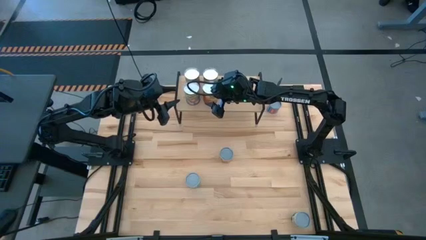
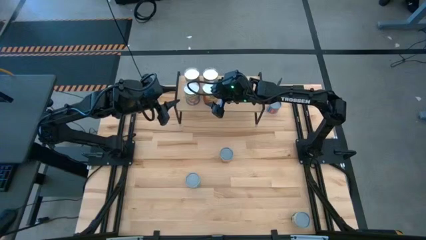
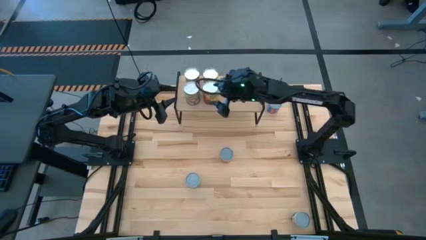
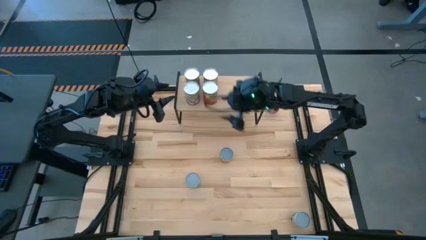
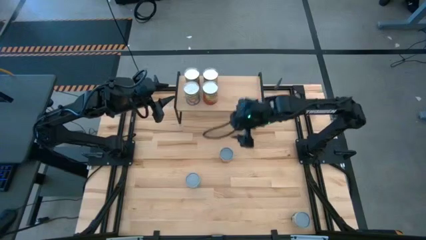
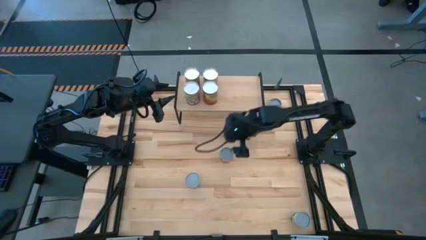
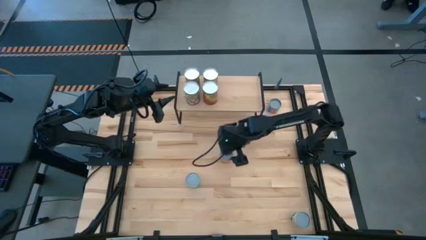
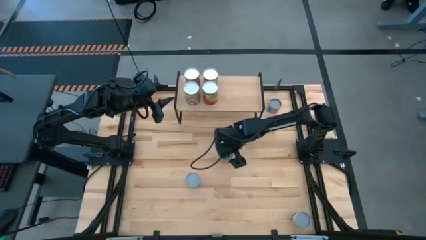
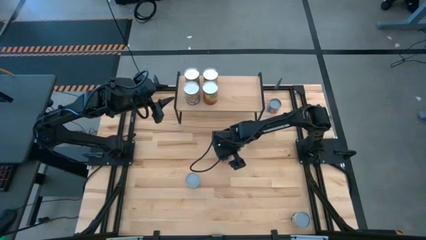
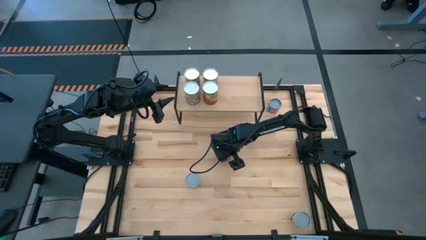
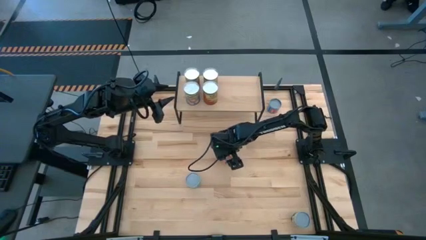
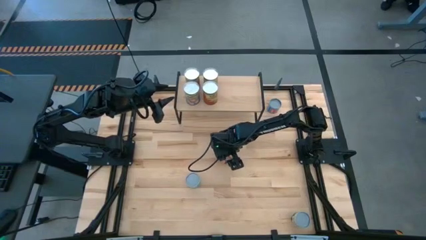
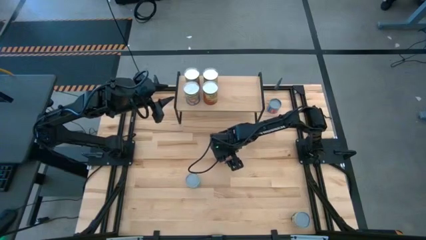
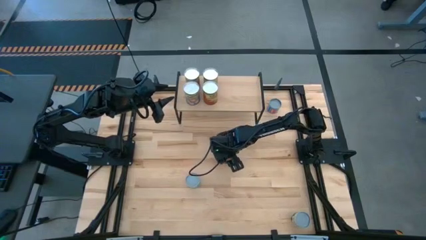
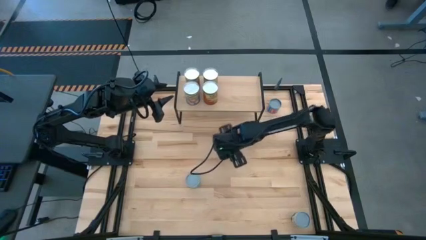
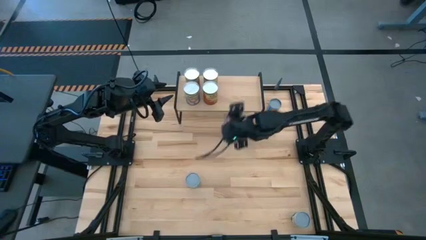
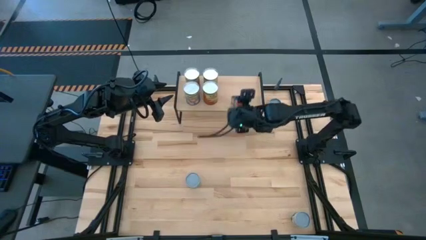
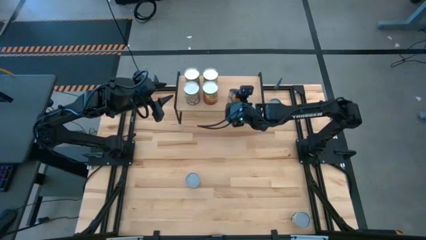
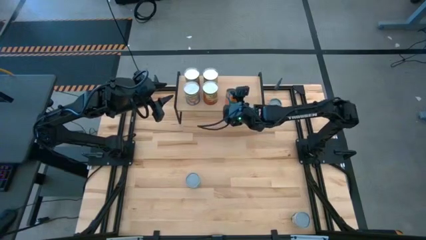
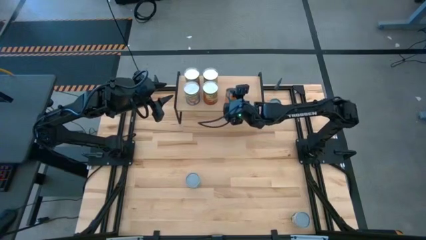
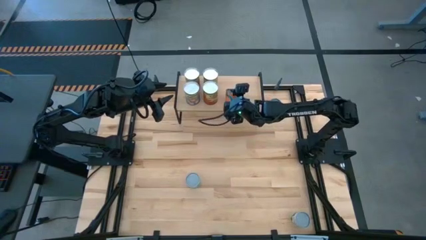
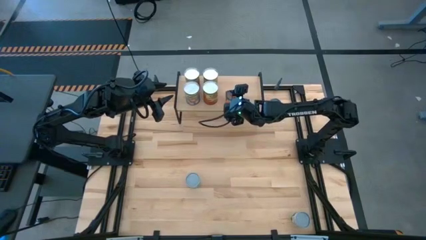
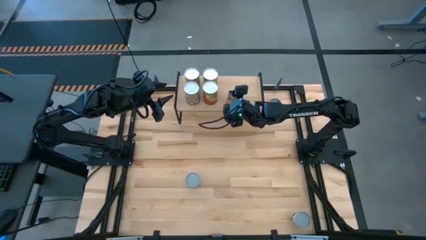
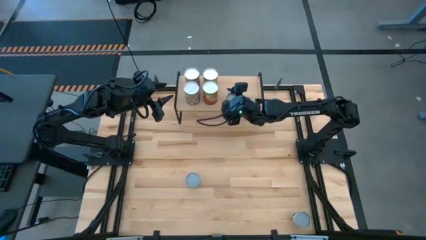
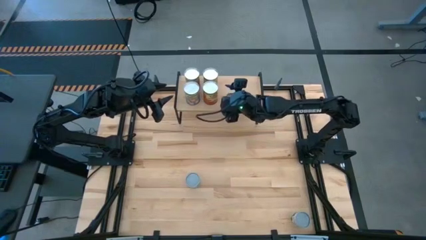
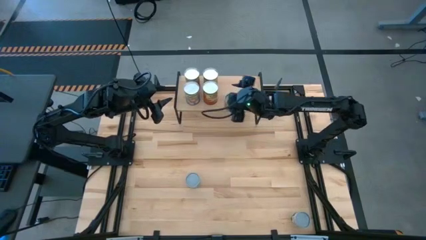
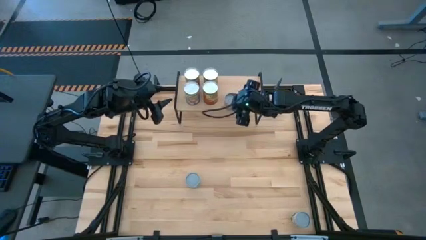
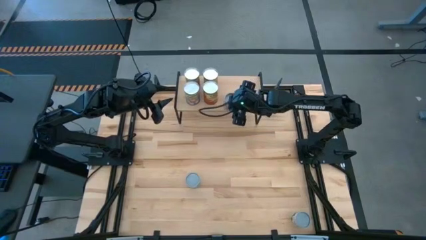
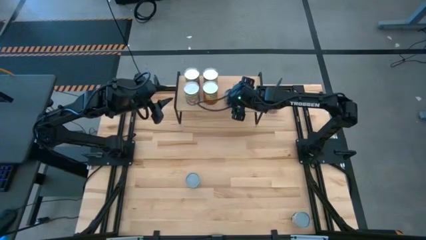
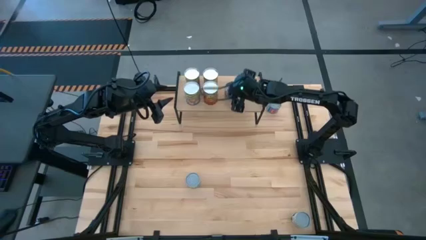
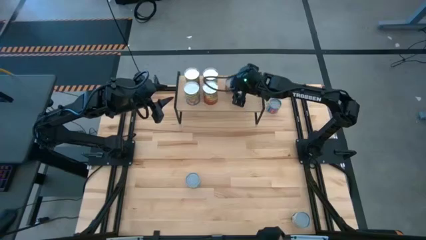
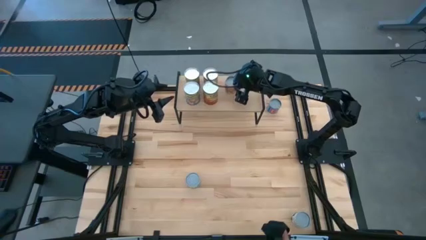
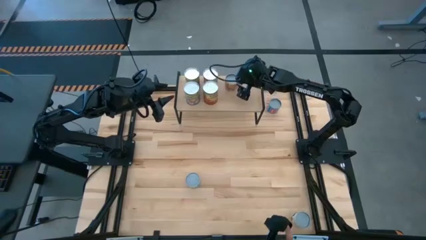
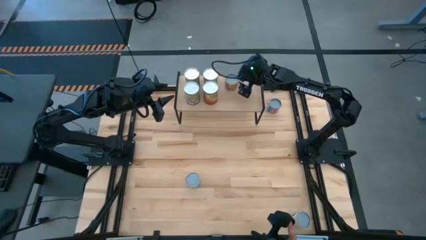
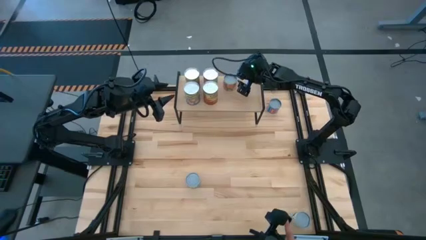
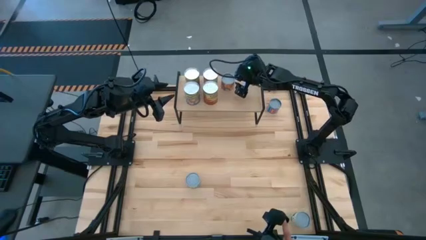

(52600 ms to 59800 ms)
Task: Pick and place cans onto a shelf
Put the canned oranges on the shelf

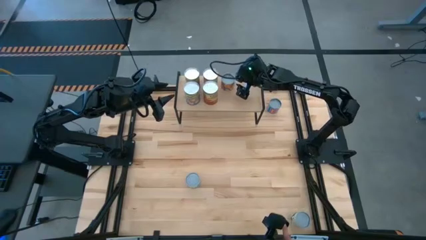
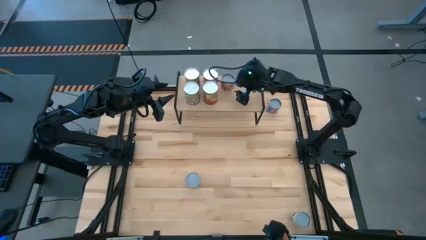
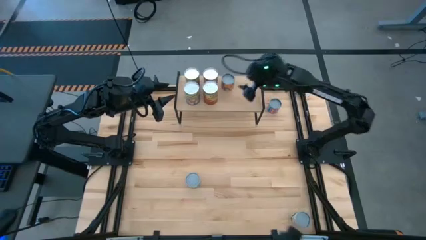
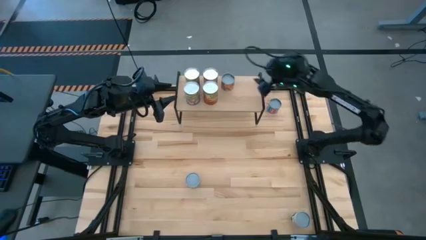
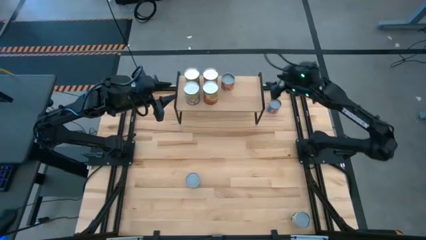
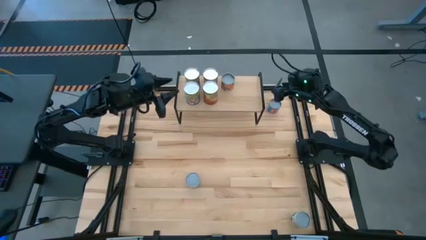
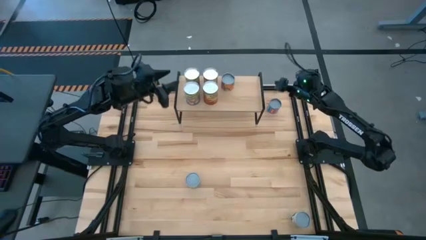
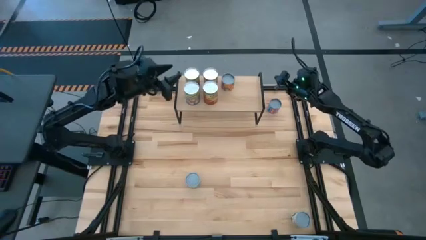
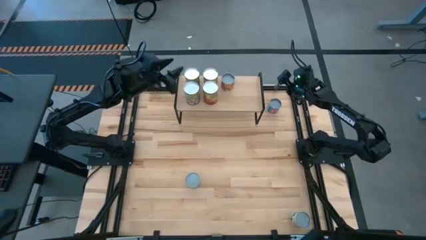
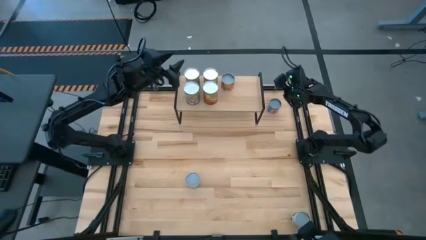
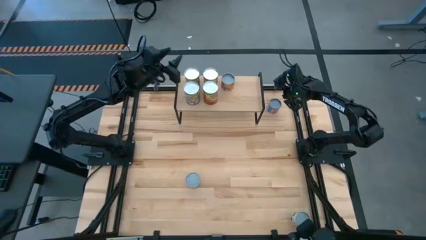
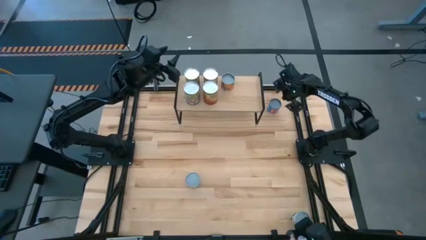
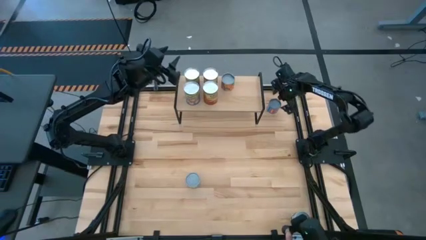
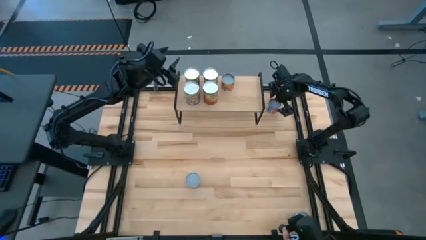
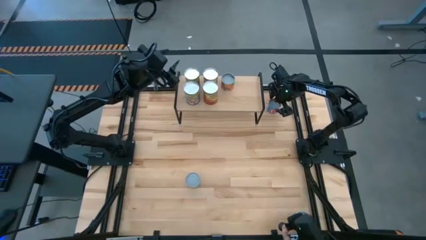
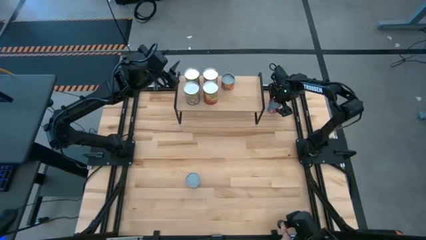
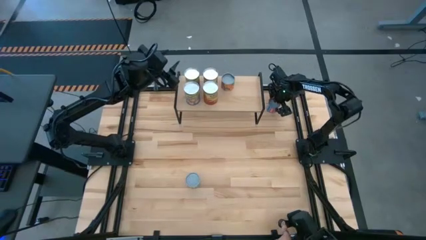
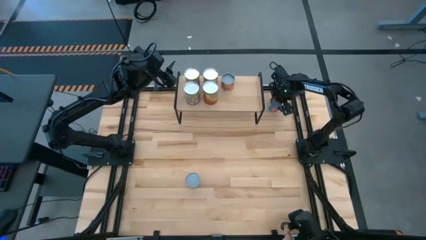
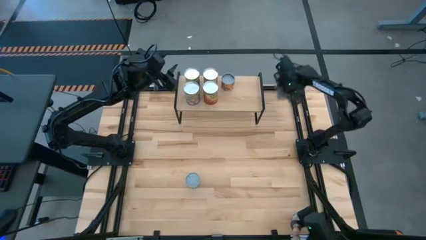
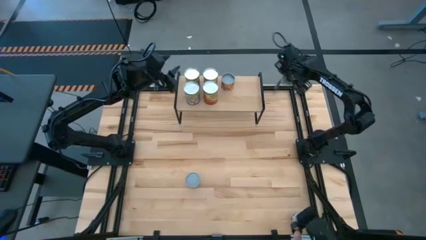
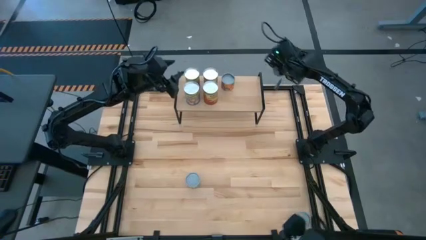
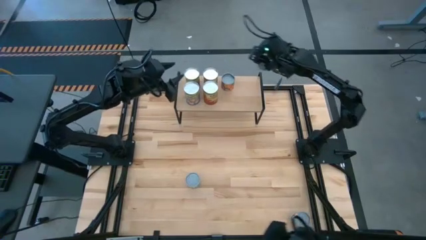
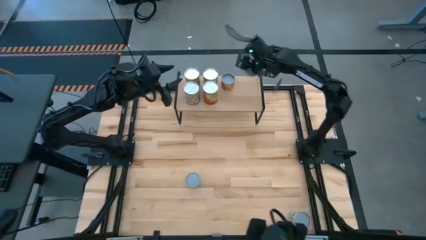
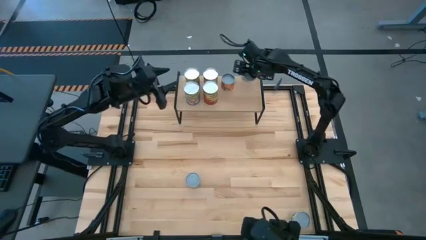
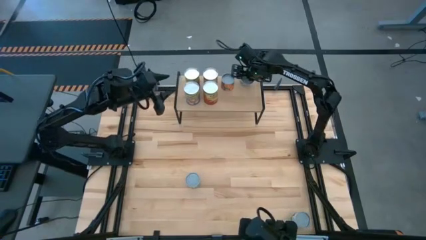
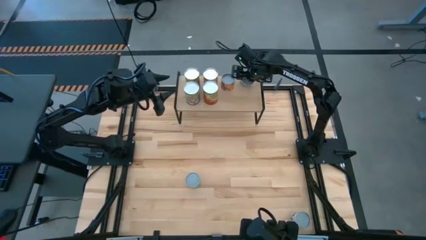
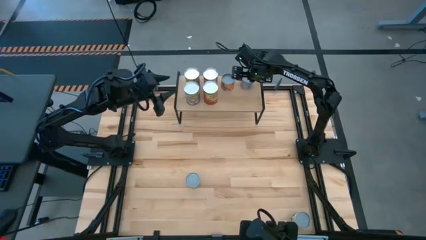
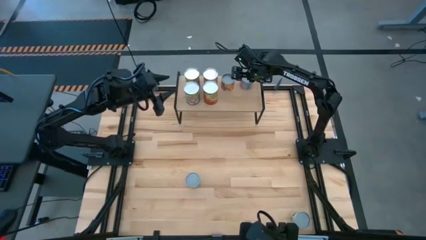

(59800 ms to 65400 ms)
Put the canned corn on the shelf

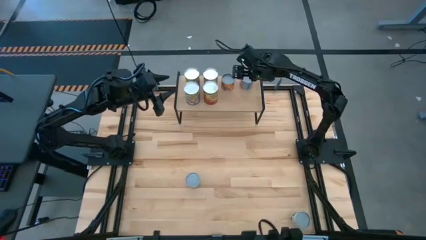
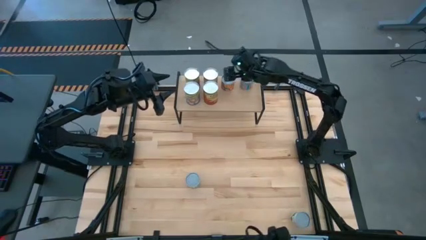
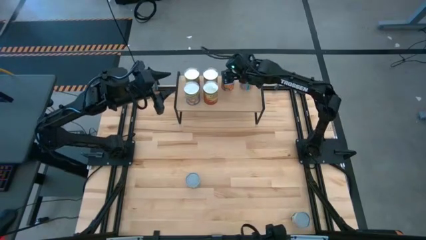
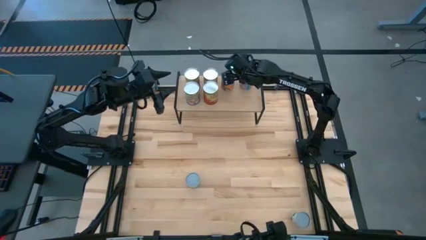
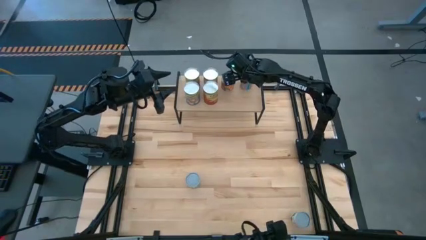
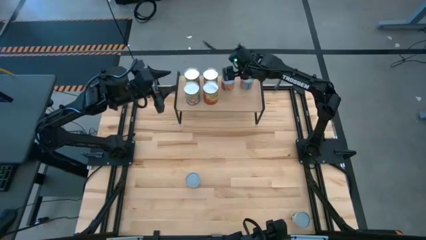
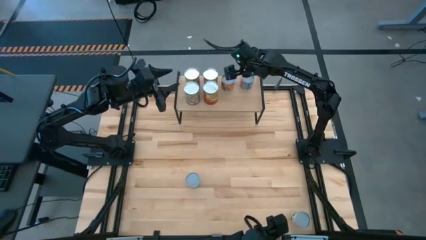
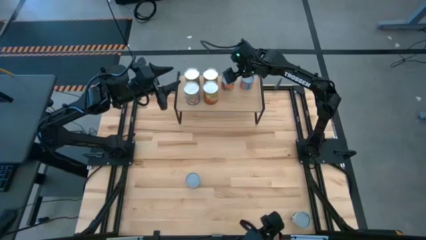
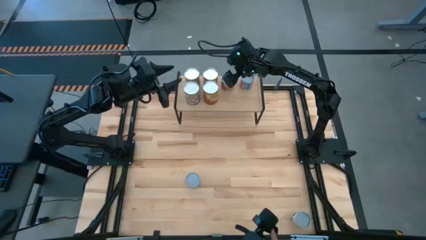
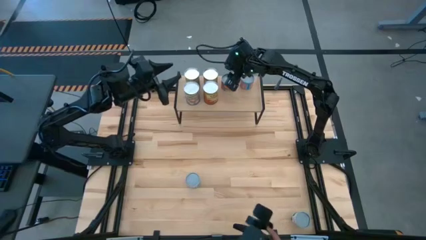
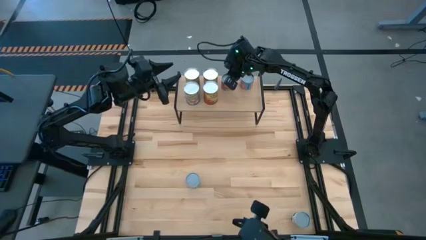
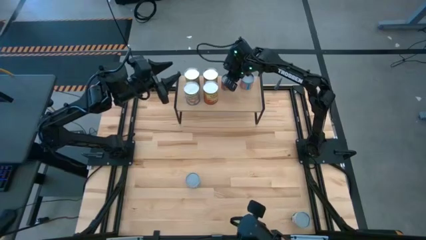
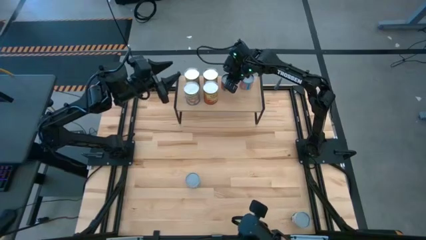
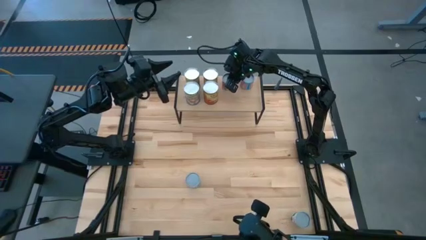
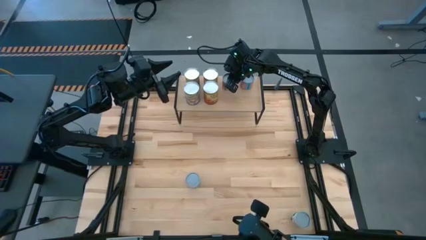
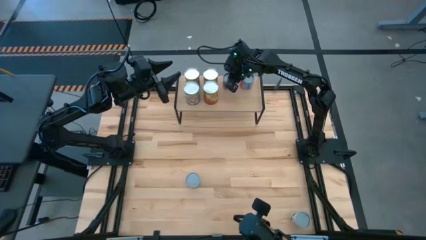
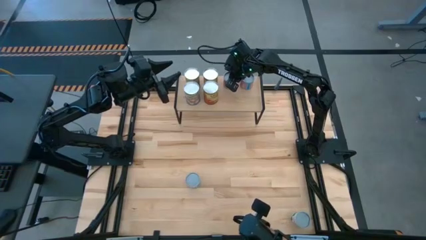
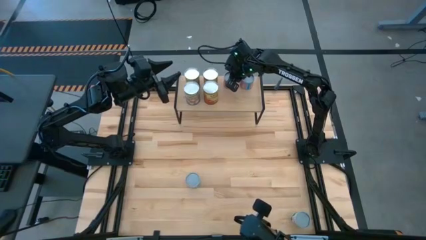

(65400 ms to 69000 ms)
Adjust the canned oranges on the shelf

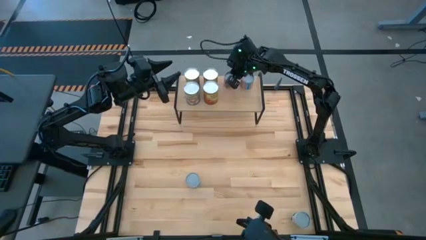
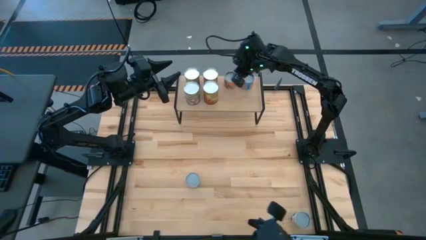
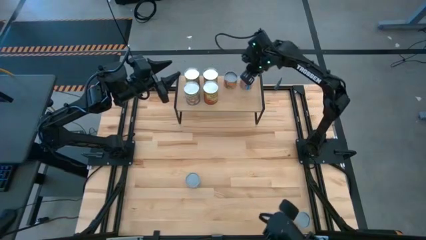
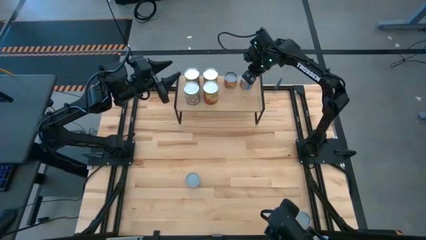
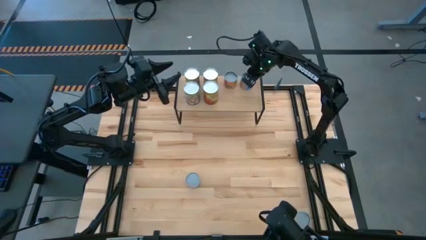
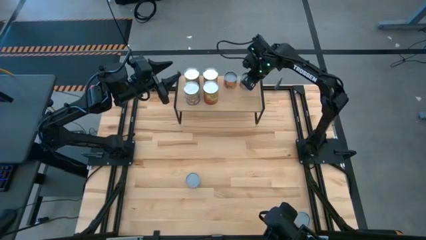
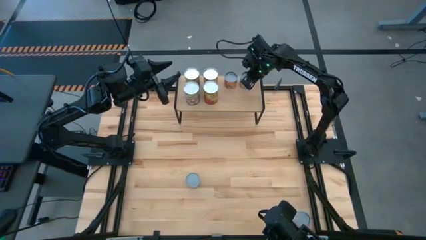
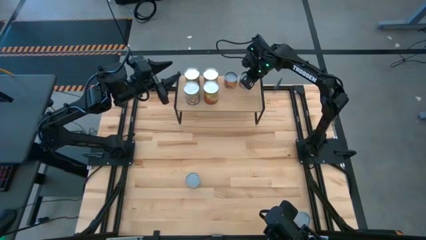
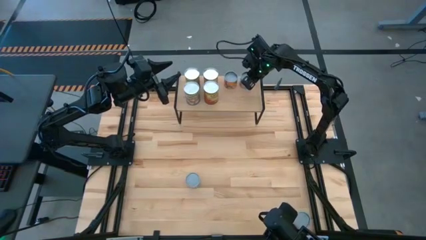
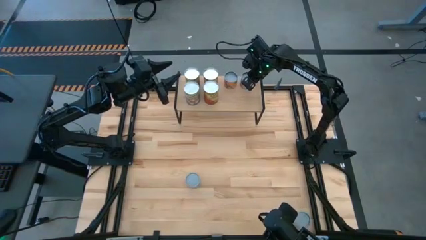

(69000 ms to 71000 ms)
Adjust the canned corn on the shelf
